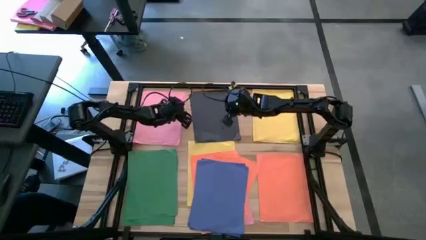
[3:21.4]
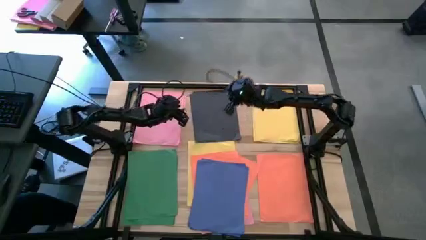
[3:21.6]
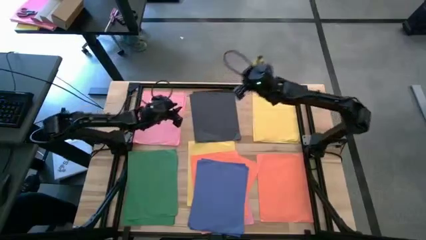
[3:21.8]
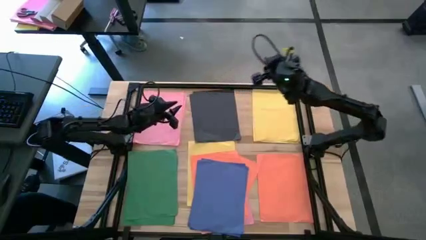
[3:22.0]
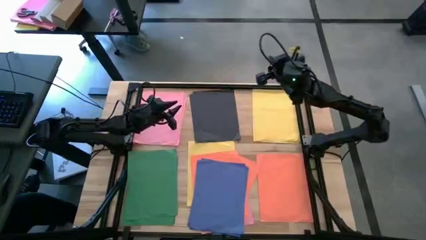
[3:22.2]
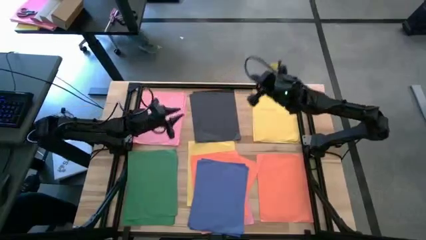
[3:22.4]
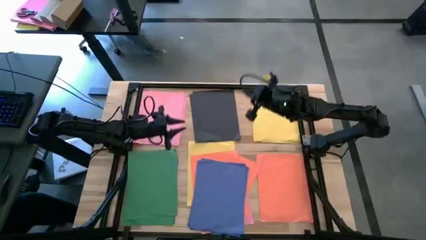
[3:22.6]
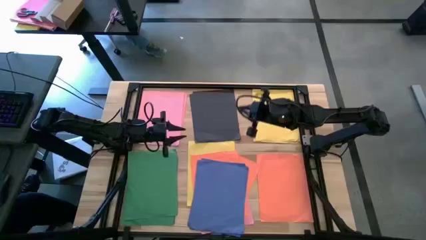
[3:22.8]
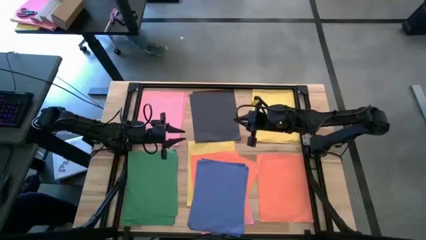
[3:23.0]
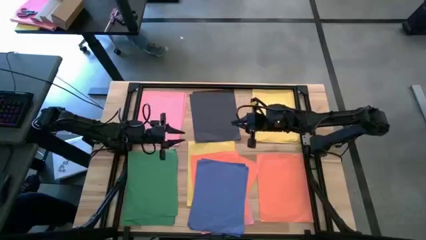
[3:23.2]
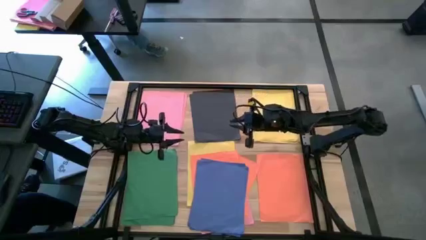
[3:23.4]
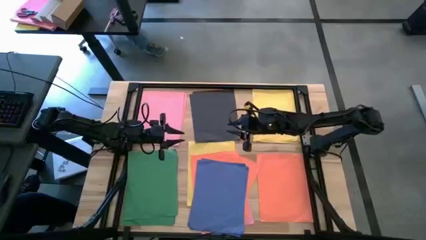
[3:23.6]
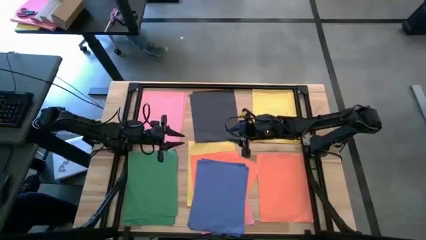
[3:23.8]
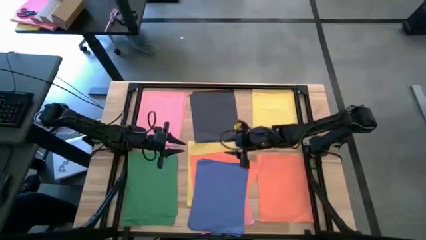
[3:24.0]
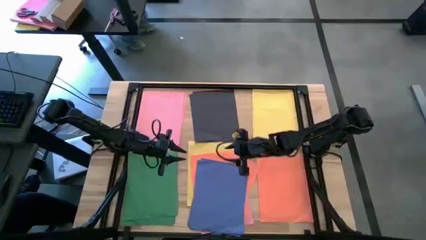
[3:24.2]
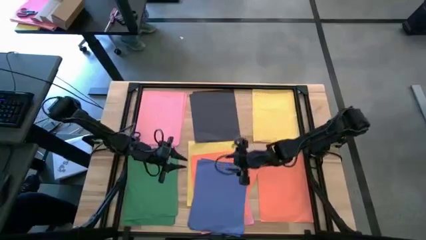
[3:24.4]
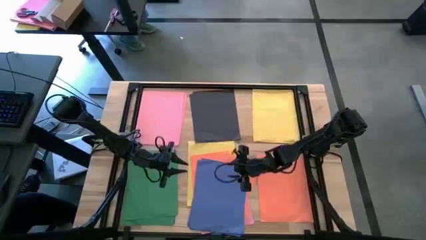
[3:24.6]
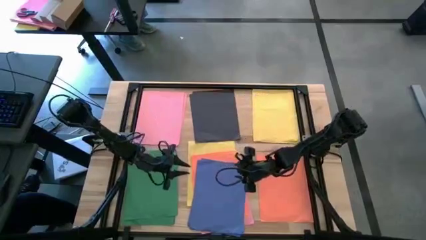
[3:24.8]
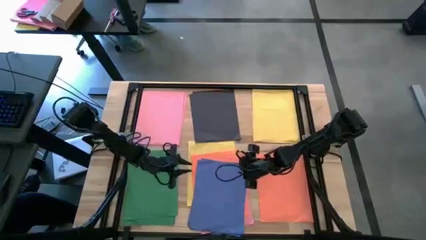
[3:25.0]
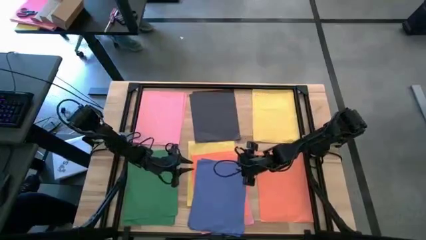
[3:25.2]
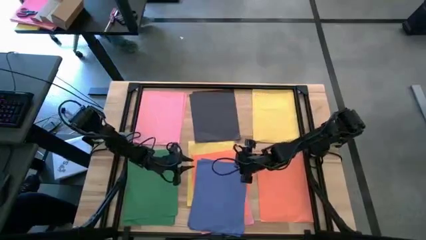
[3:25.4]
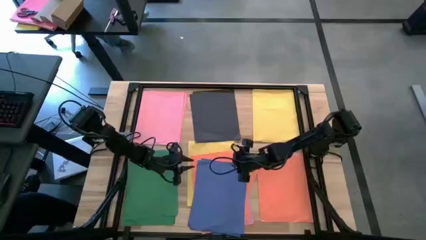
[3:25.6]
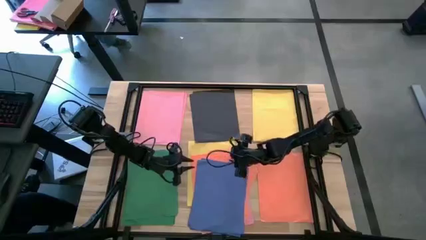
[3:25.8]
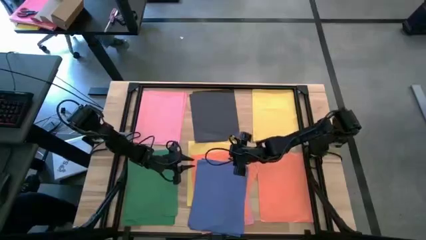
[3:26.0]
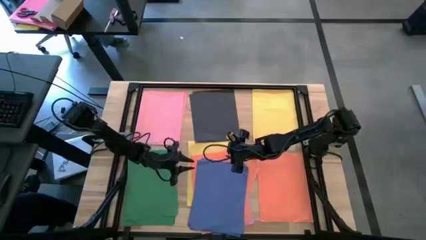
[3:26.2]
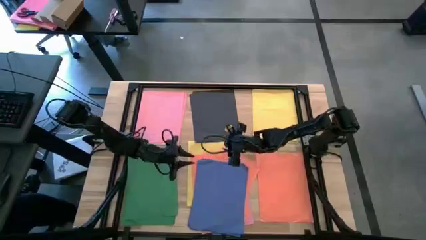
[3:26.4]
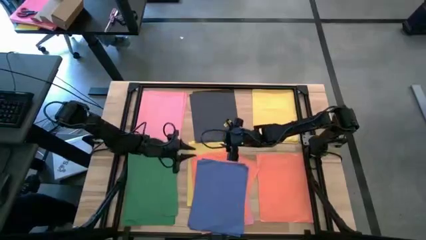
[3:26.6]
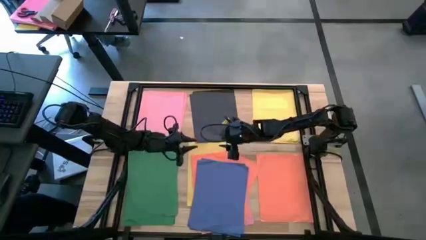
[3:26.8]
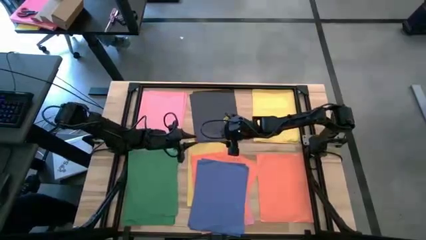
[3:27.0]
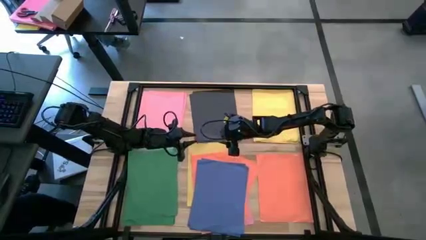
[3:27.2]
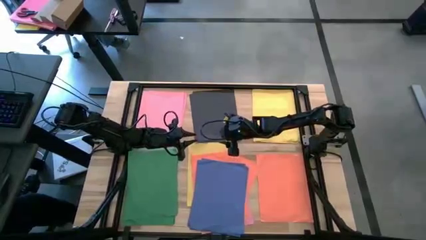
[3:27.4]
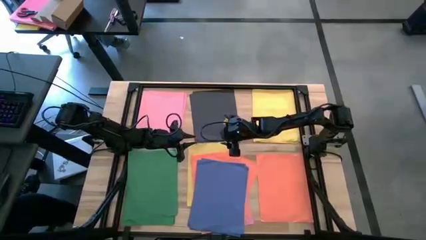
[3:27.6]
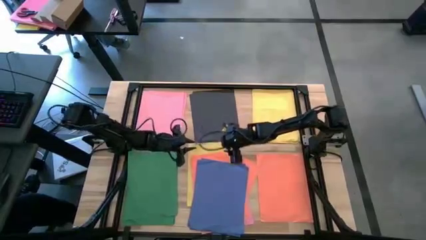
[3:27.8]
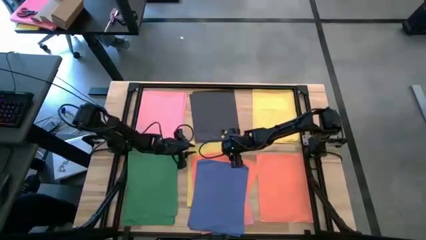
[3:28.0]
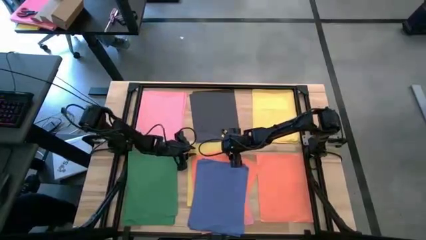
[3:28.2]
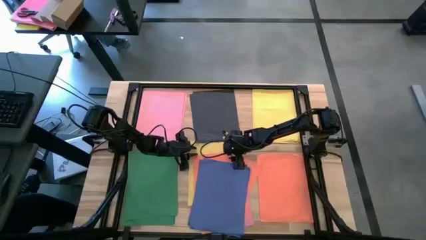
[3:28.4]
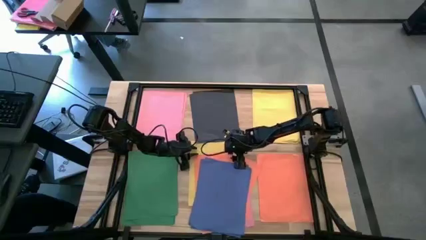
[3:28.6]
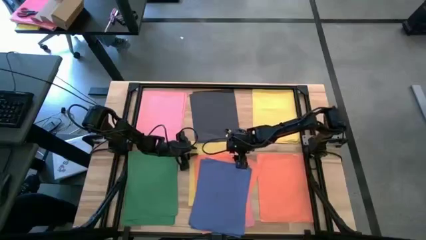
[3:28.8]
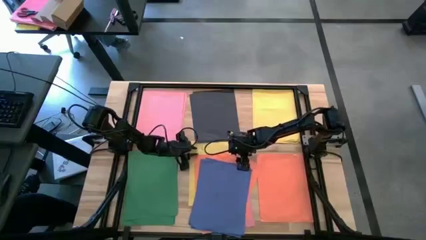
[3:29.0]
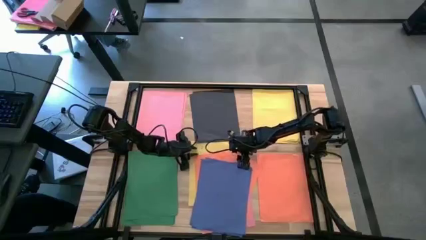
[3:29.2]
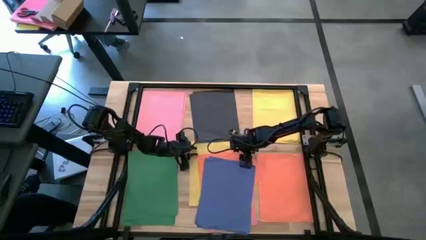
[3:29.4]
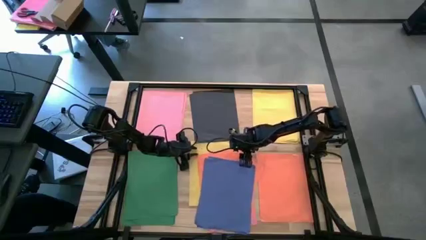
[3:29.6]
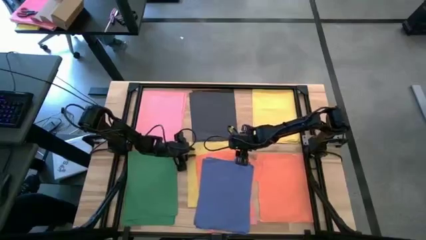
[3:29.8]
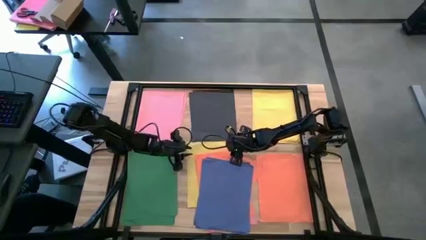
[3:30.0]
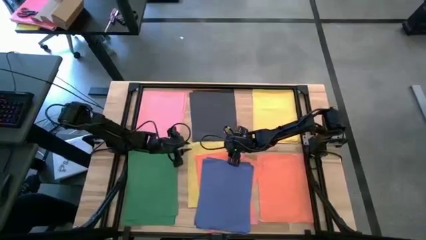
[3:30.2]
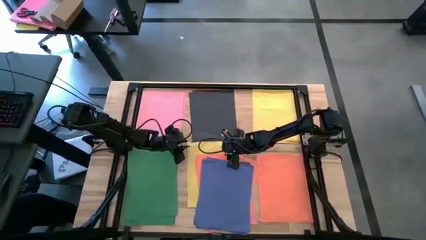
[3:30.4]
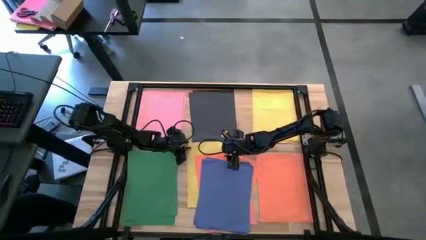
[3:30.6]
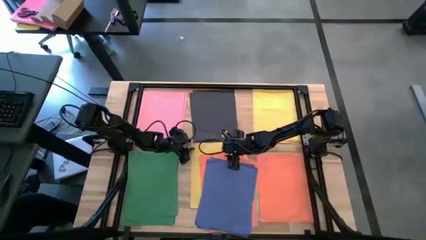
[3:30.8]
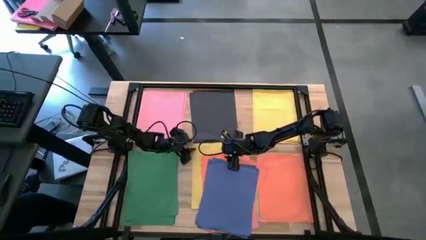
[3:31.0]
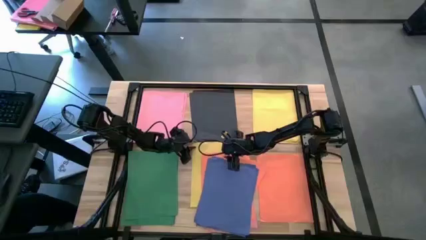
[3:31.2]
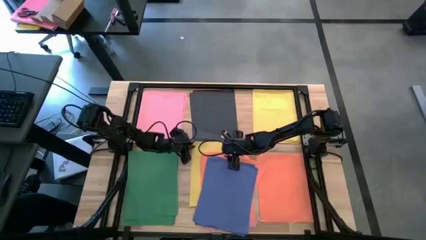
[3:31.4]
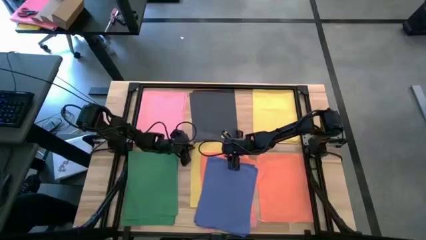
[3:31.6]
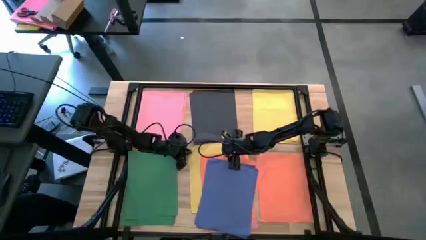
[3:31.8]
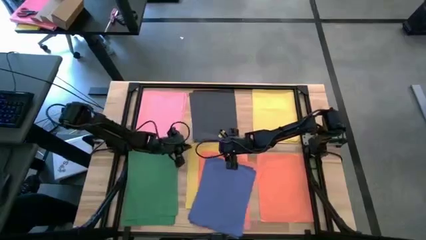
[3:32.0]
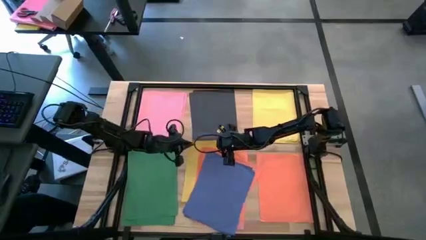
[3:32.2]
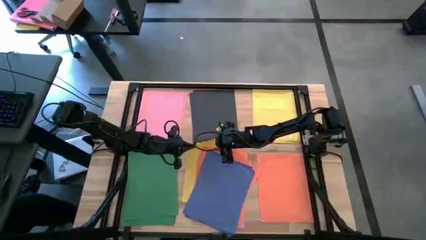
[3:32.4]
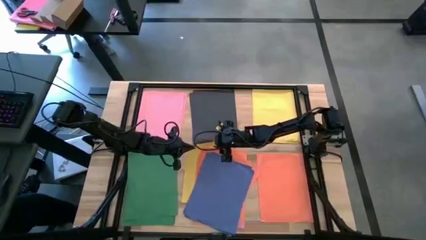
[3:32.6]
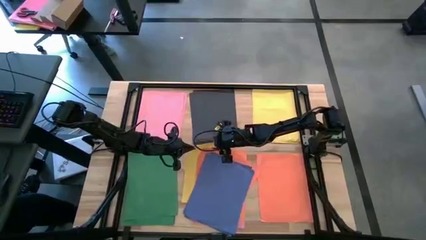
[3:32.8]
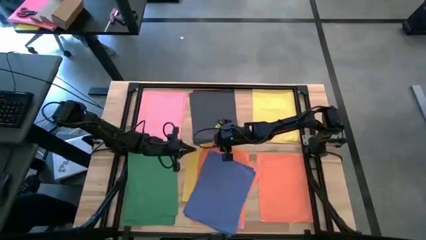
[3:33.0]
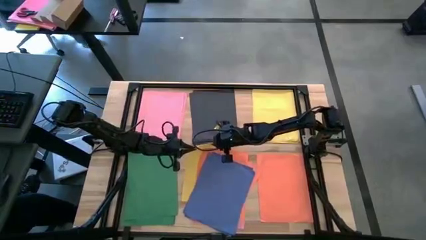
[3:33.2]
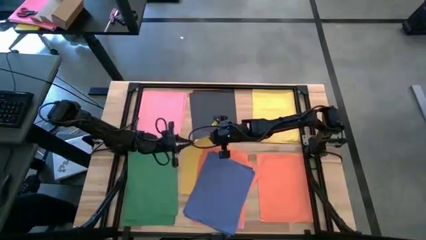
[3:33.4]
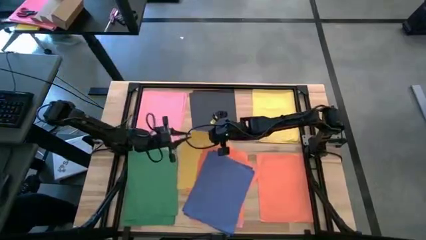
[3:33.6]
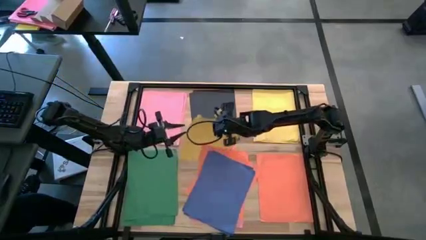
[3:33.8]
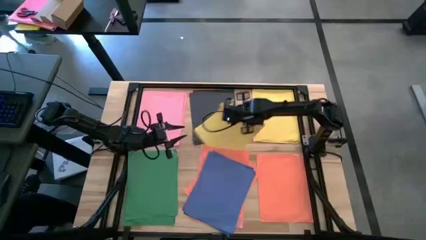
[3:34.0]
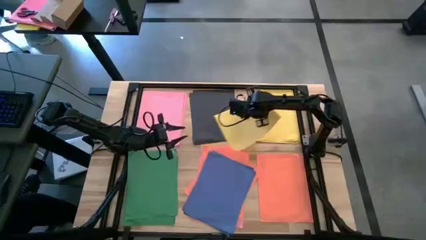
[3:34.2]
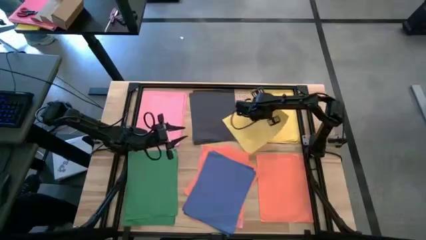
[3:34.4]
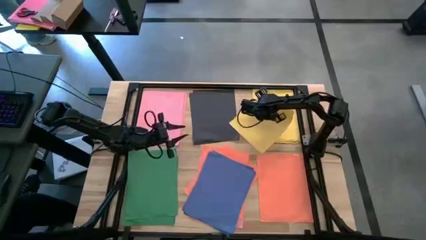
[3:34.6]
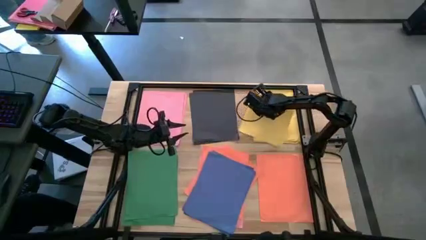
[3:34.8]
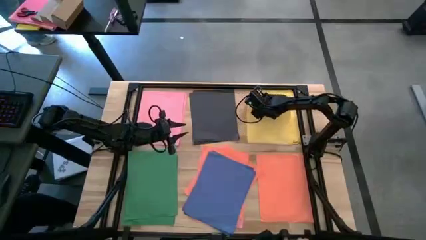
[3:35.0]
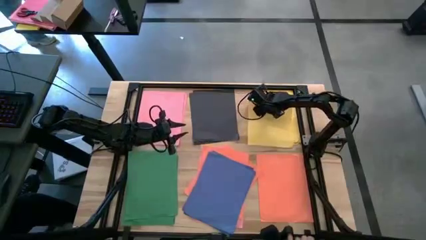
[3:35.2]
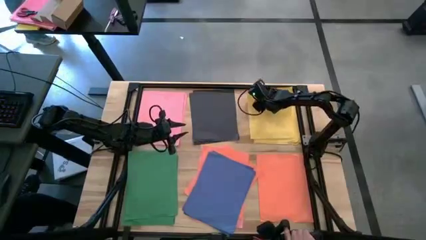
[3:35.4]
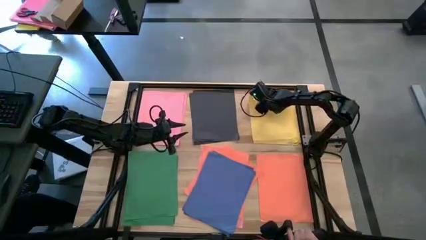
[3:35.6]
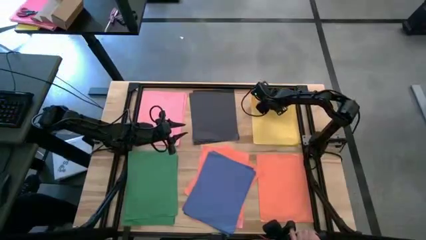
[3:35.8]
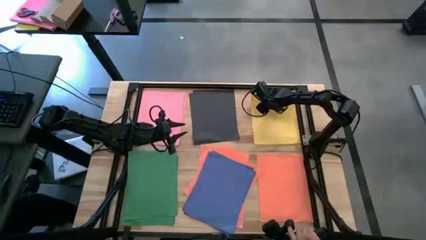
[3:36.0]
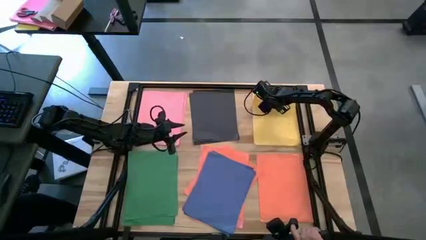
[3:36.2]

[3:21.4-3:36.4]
Task: Organize paper
Stack the yellow color paper on top of the other yellow color paper
